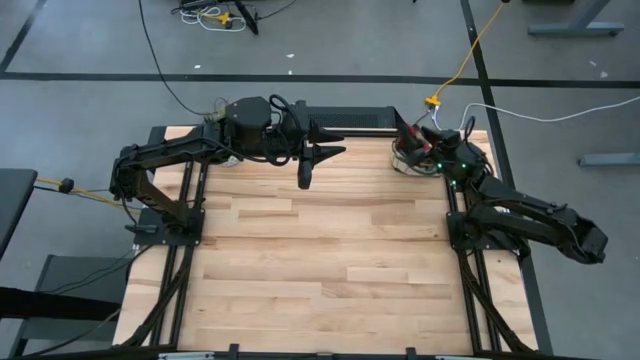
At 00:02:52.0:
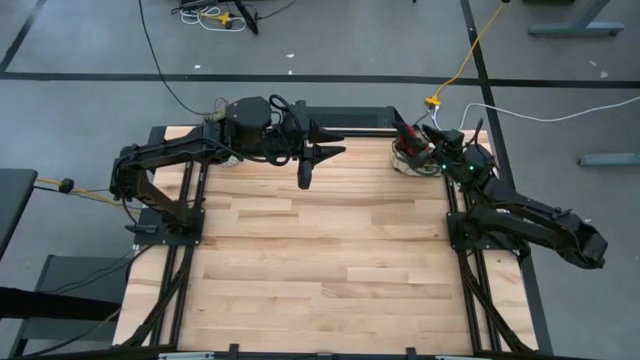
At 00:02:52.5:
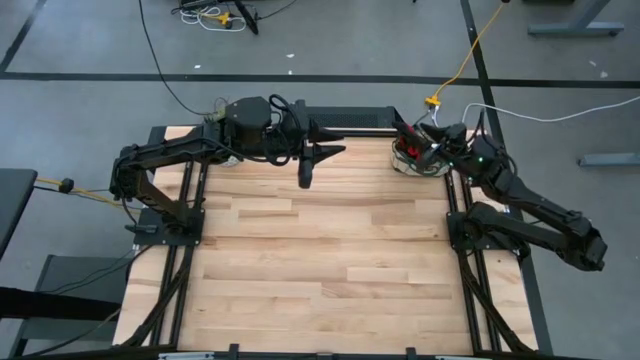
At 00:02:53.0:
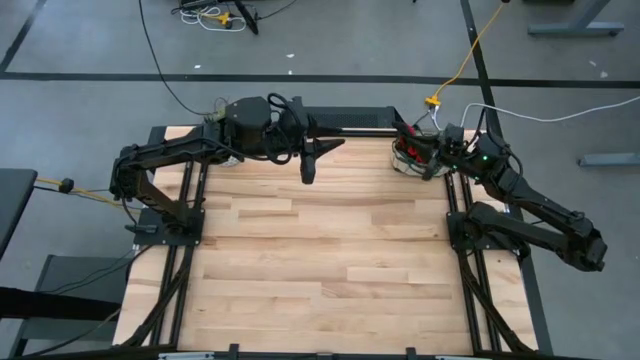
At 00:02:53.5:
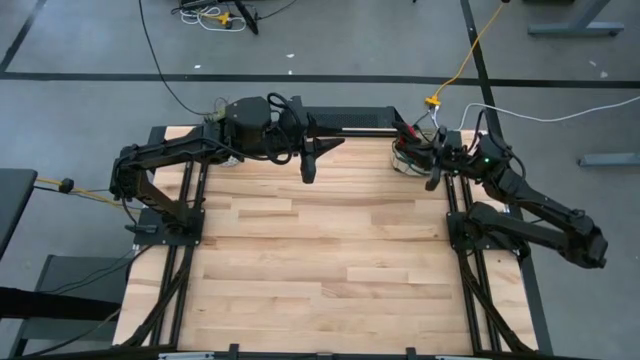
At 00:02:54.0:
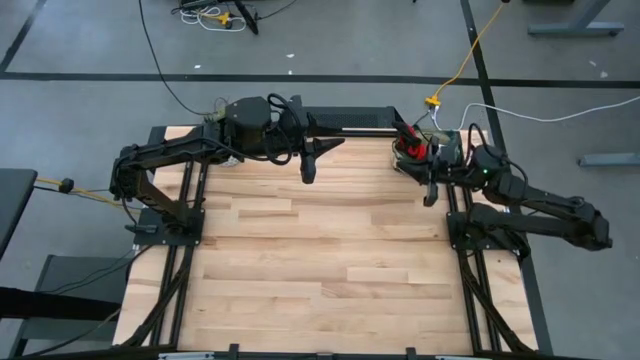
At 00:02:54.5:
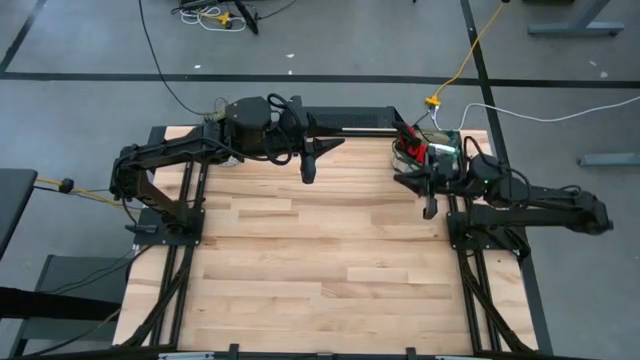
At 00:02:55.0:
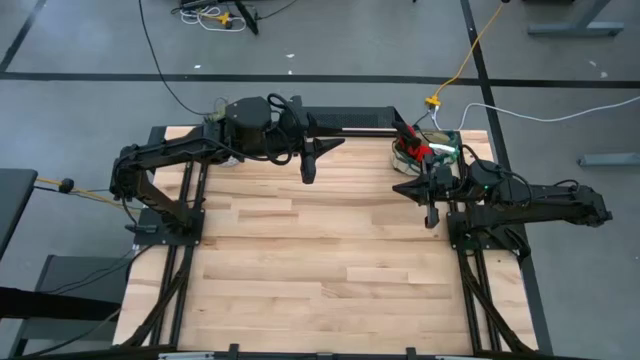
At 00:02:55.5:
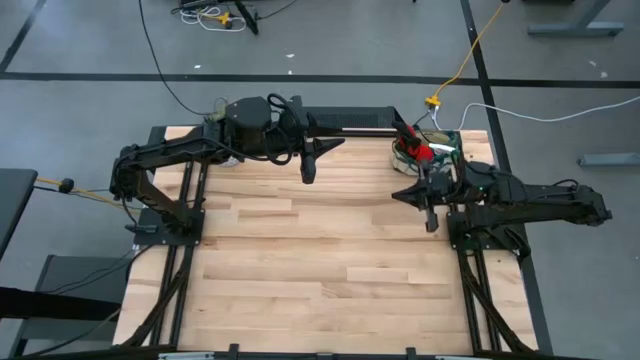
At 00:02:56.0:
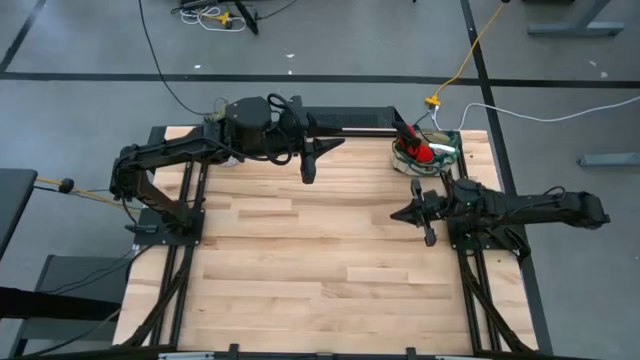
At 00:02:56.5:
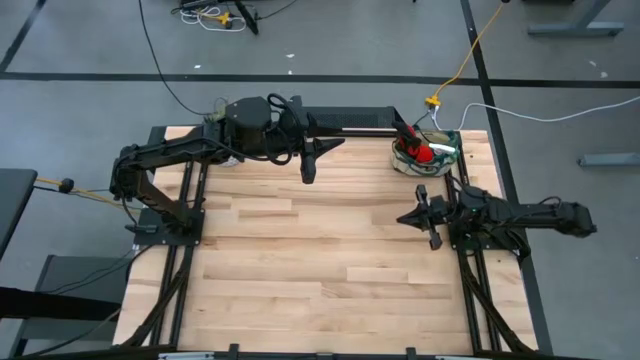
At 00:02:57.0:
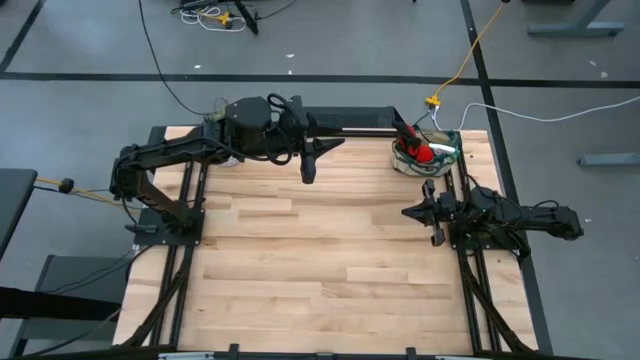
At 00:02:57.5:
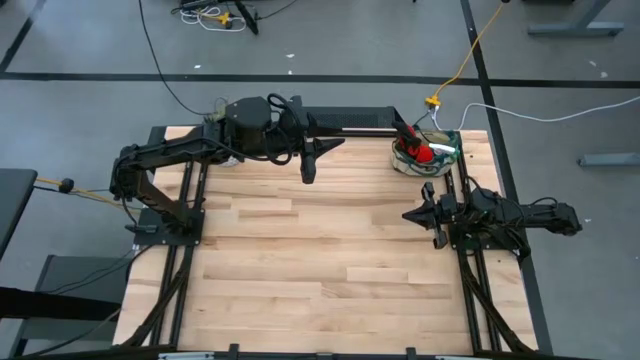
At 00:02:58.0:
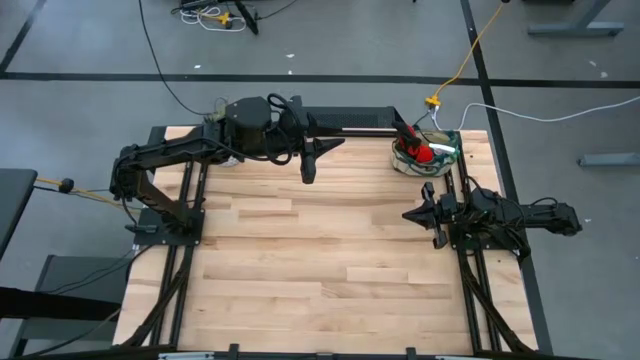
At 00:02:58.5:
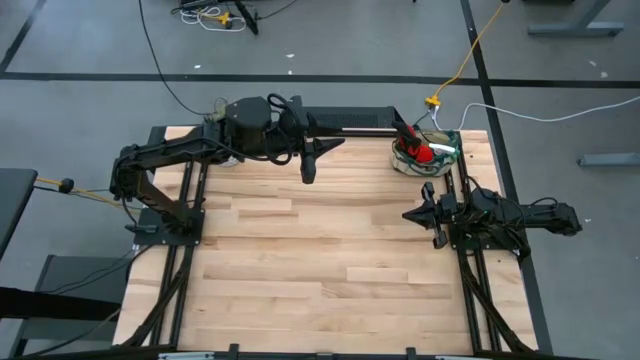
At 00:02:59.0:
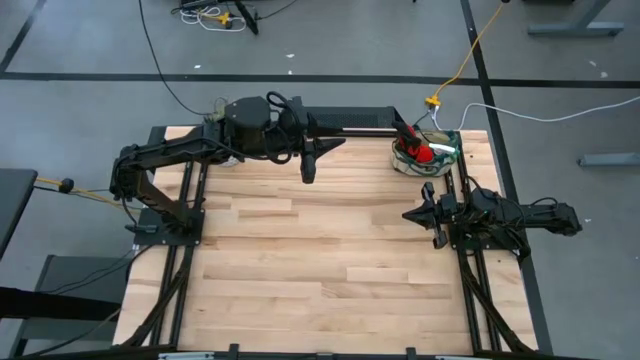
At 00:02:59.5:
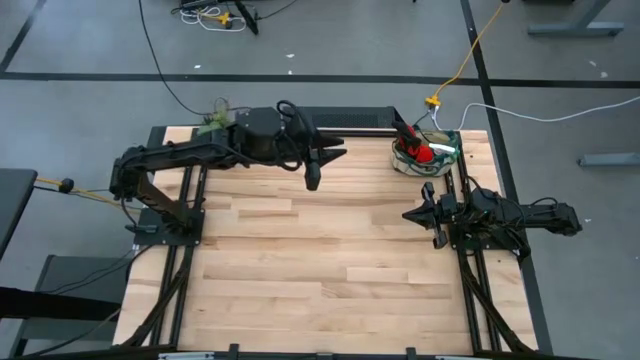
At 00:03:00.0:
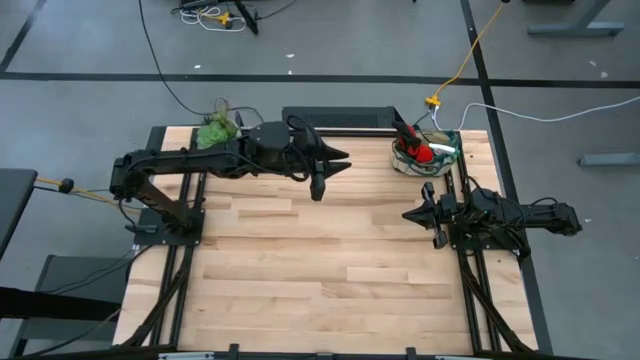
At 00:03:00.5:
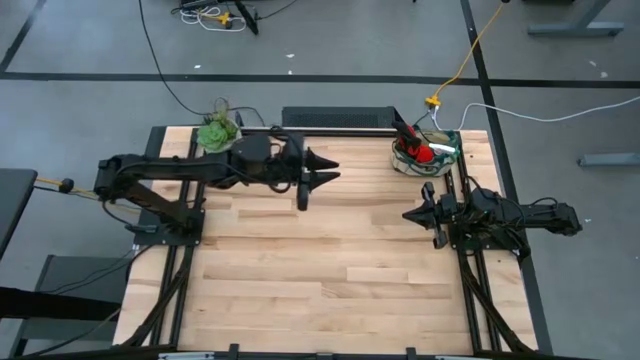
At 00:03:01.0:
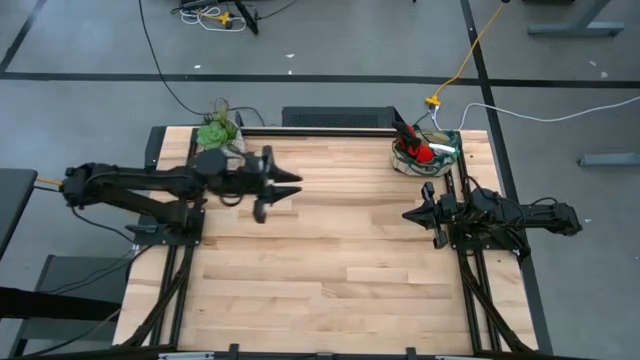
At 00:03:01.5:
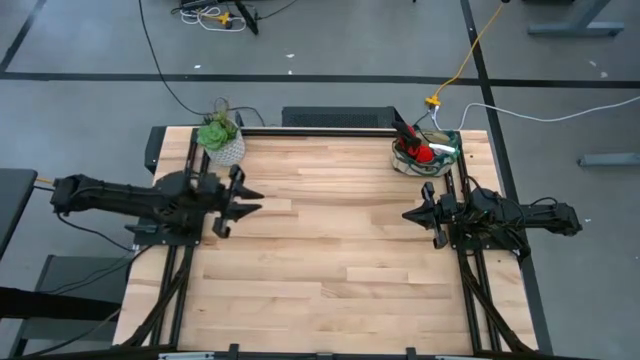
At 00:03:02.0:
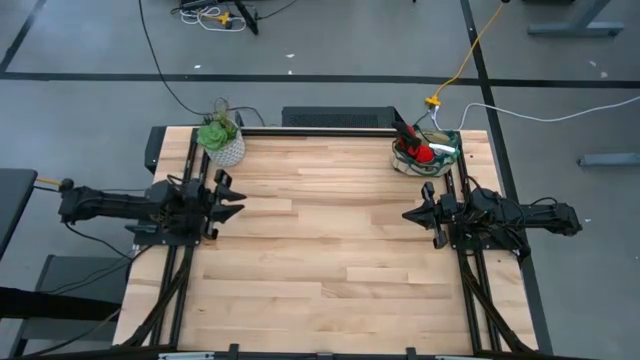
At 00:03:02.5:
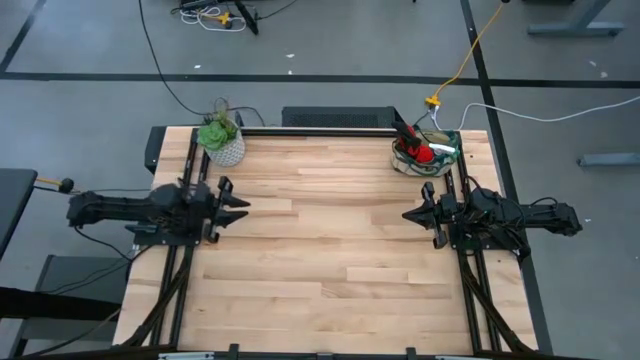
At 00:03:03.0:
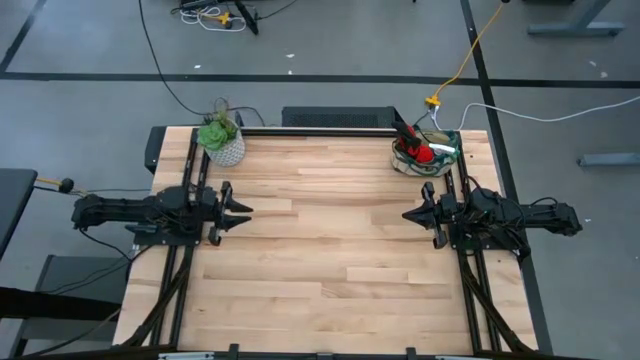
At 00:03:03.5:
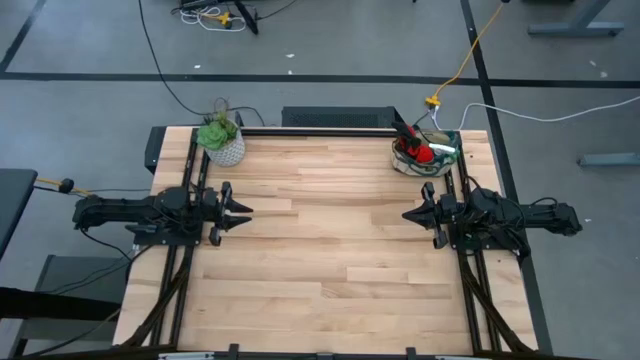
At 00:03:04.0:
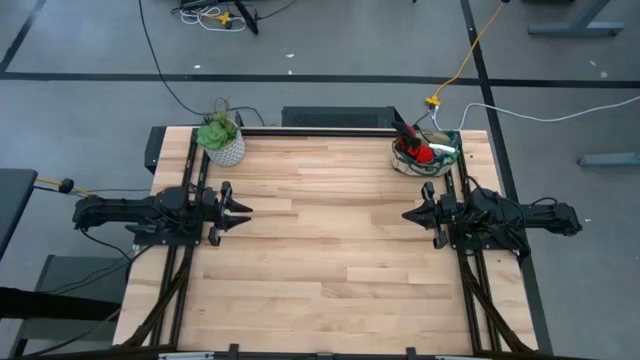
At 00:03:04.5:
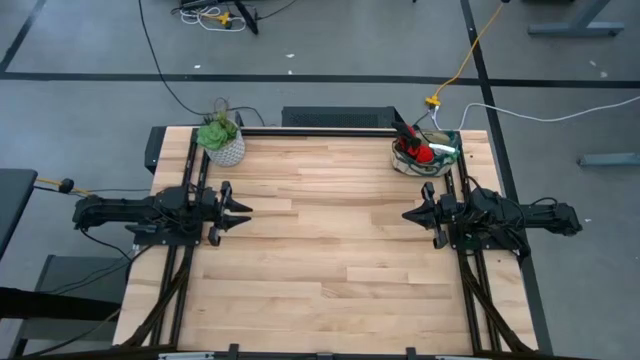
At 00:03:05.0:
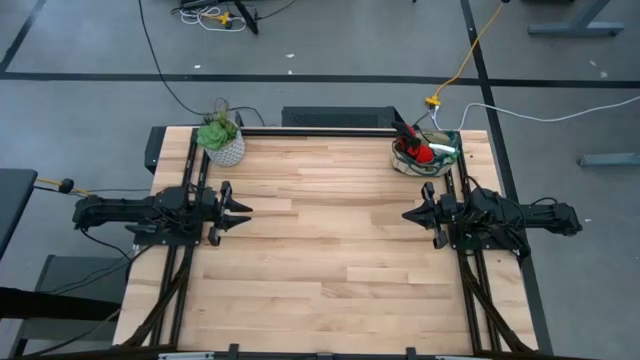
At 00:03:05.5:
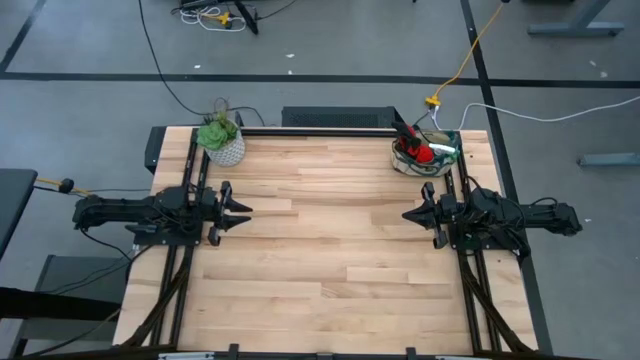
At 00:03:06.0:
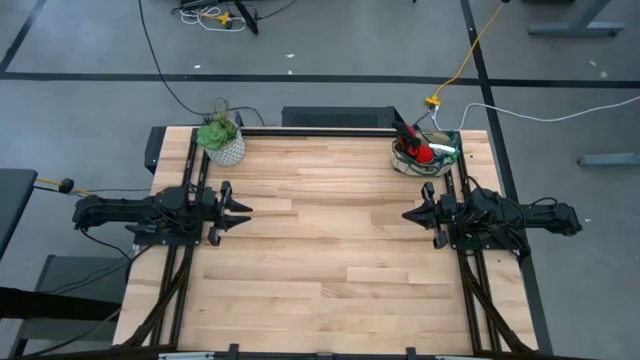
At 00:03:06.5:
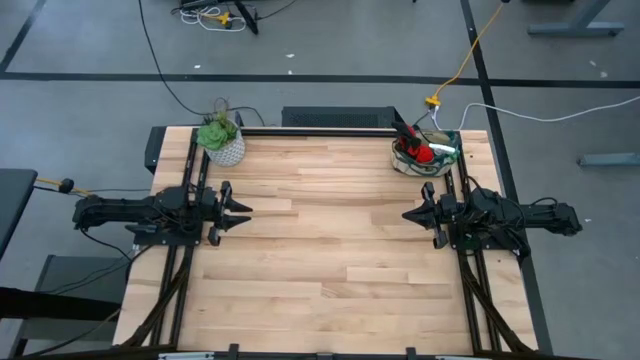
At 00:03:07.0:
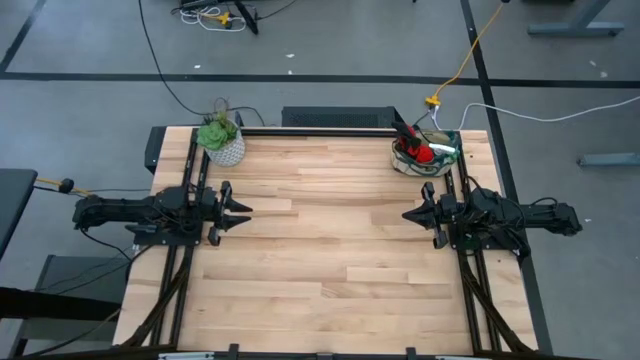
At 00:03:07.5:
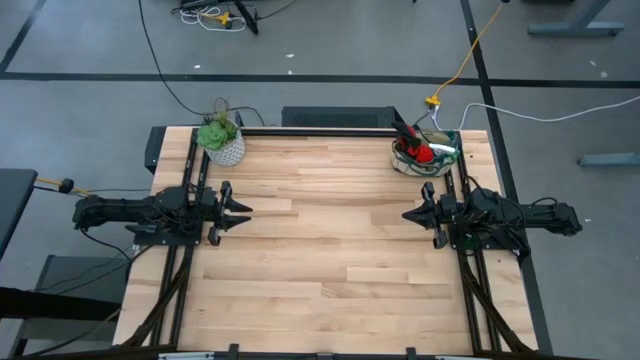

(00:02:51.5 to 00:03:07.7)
Task: Pick & Place Garden tools in Gardening bag
Return to Home Position

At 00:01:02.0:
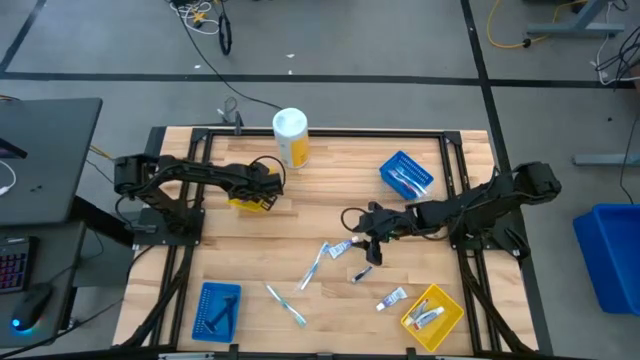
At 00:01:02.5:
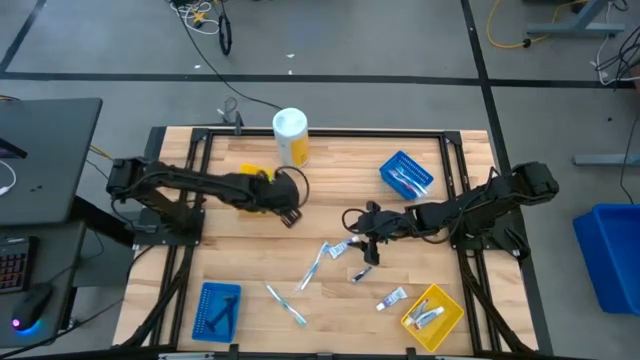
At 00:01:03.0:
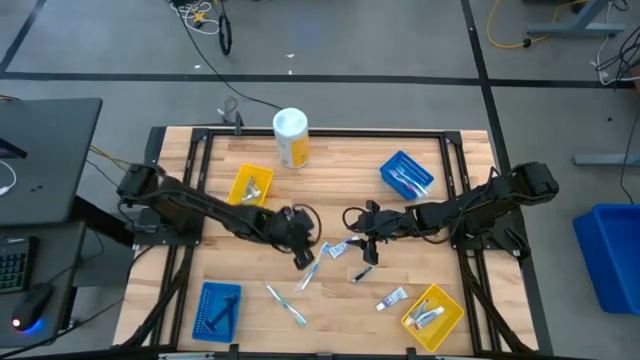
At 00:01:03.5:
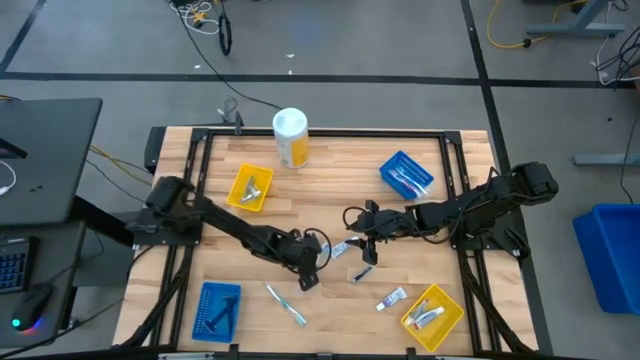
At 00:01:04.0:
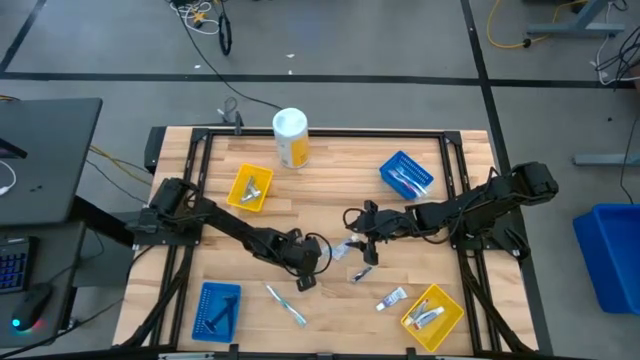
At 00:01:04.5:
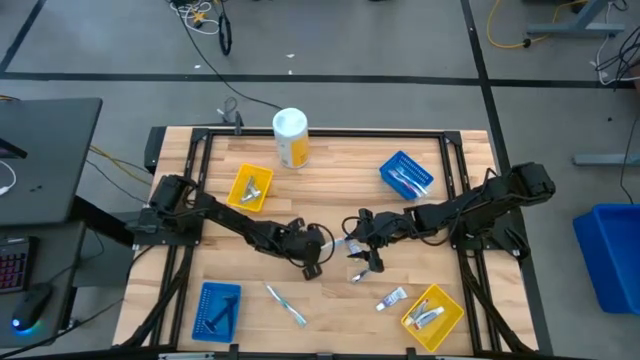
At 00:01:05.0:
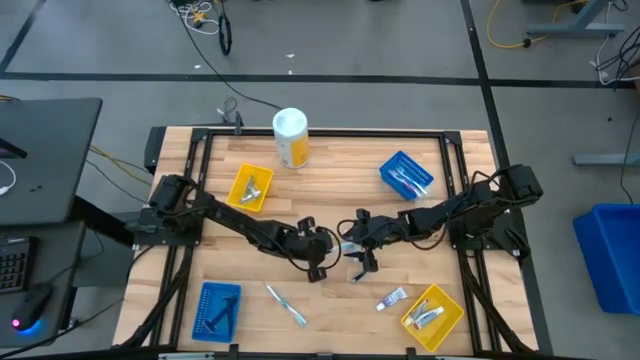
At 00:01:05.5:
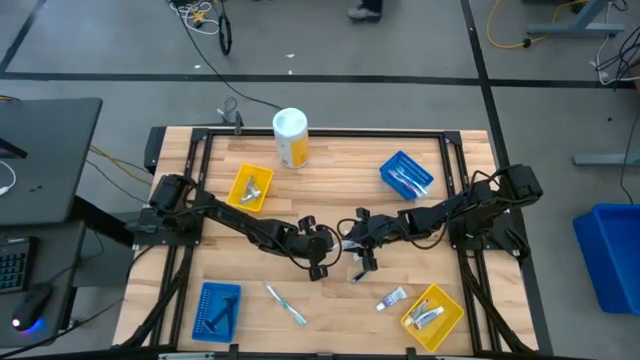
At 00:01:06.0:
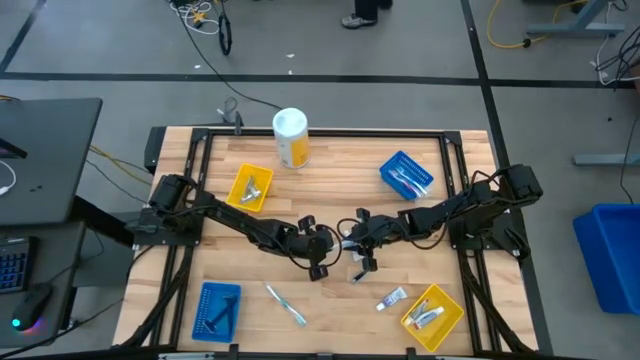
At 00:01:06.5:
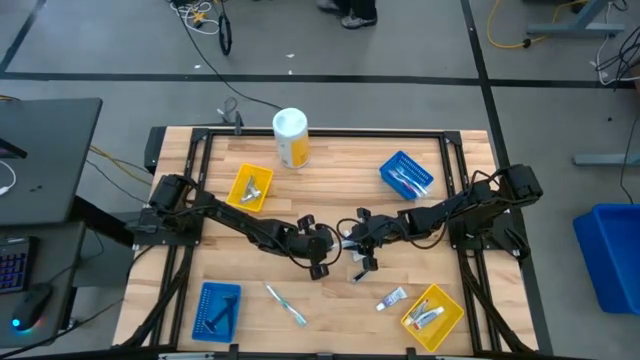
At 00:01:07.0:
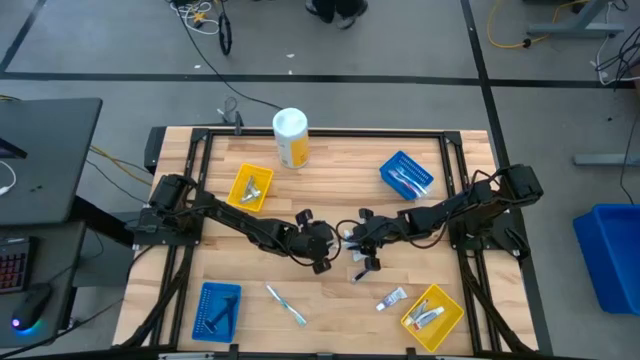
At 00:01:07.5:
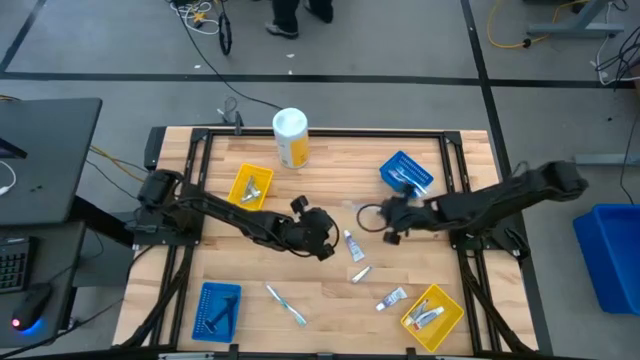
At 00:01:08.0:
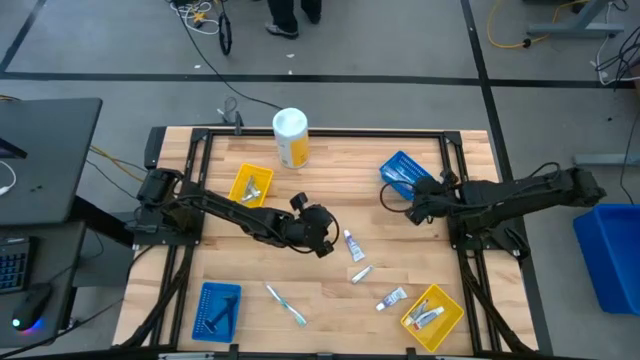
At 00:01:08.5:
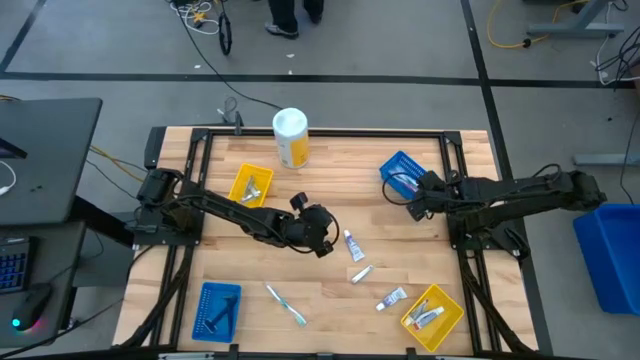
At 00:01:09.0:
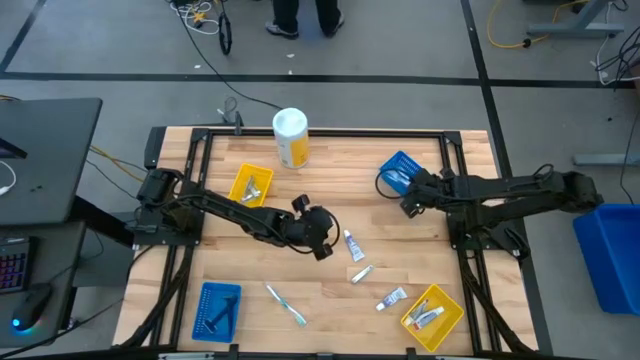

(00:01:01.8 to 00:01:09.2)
Task: Pick & Place Travel size toiletries
Put the blue toothbrush into the top blue bin
